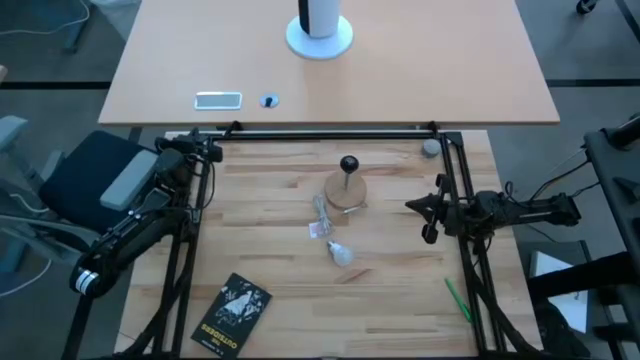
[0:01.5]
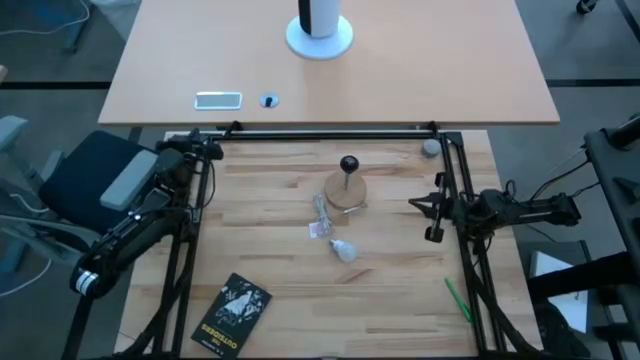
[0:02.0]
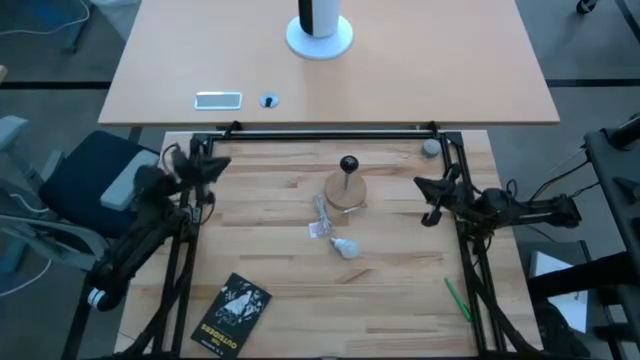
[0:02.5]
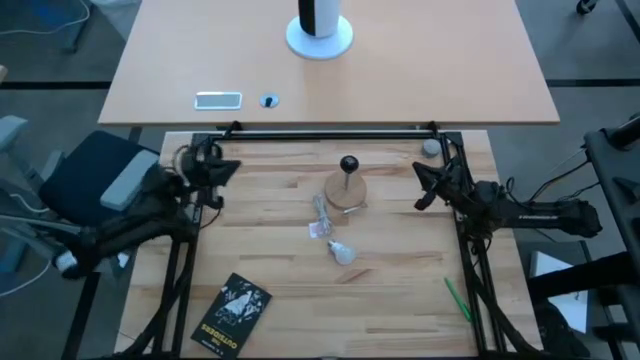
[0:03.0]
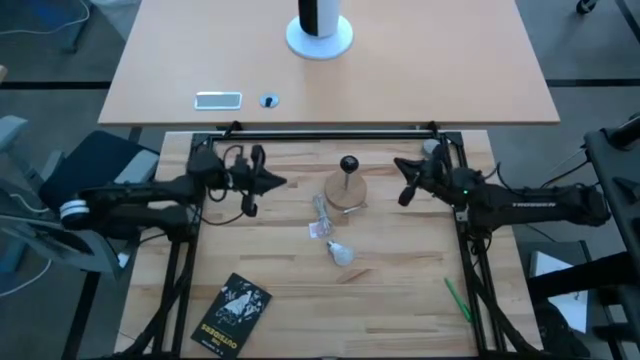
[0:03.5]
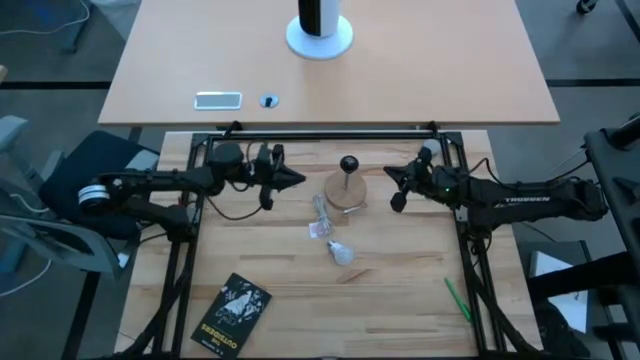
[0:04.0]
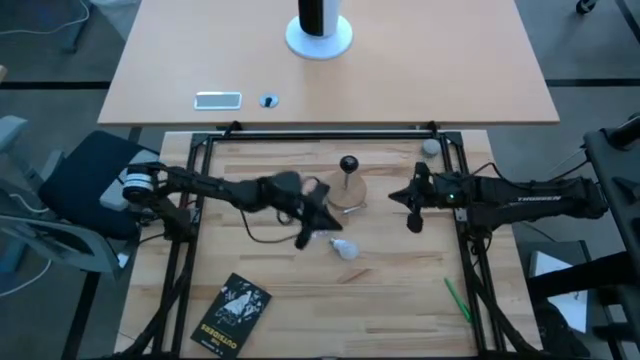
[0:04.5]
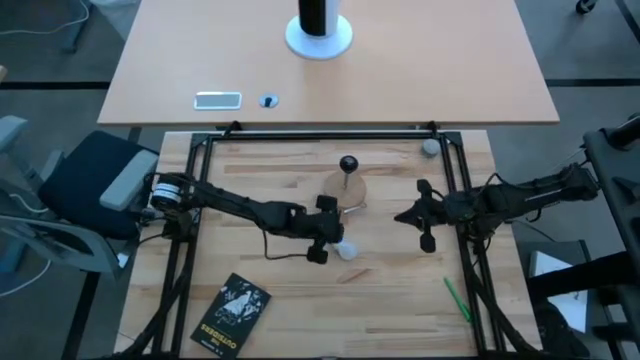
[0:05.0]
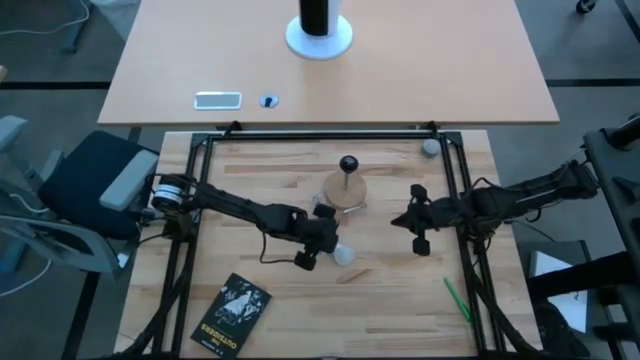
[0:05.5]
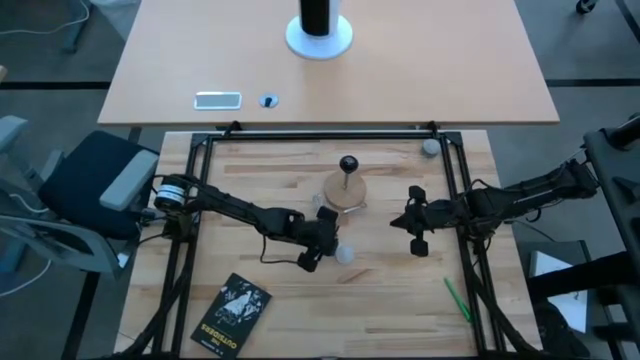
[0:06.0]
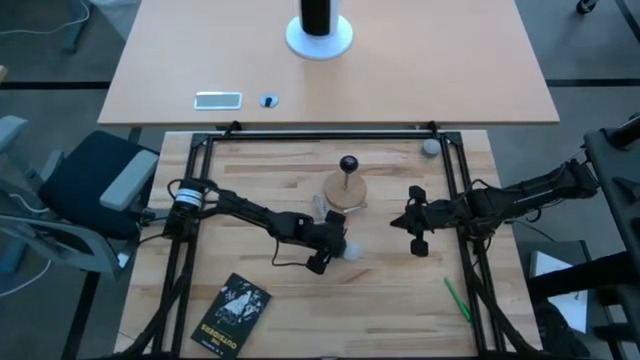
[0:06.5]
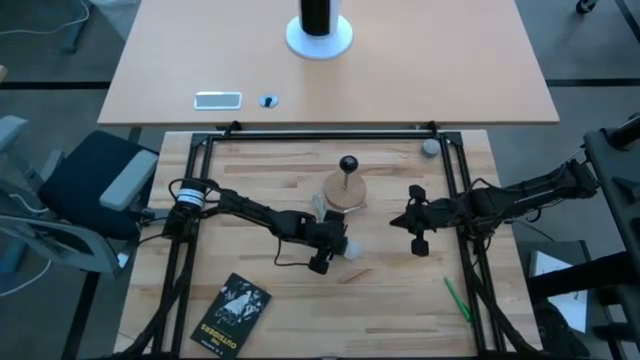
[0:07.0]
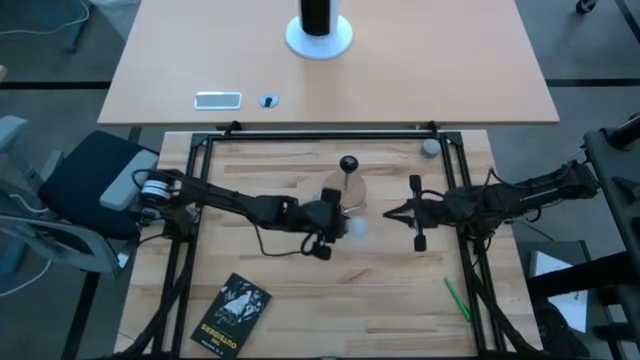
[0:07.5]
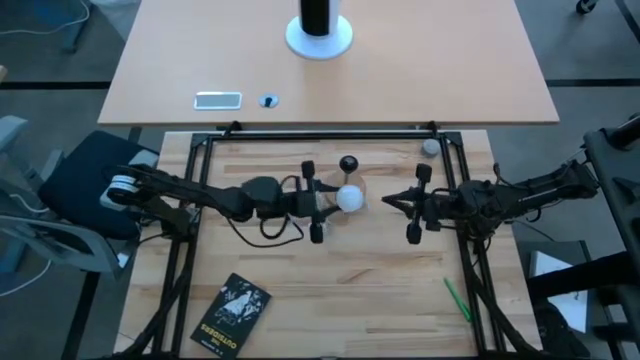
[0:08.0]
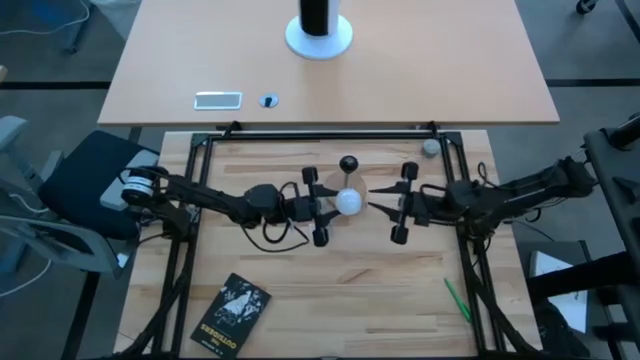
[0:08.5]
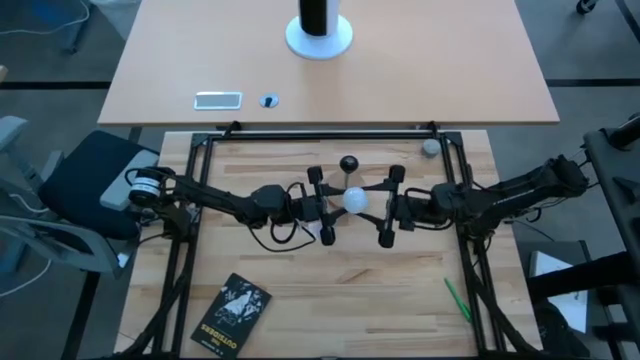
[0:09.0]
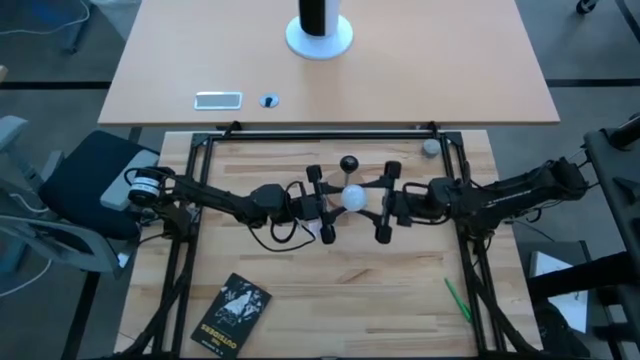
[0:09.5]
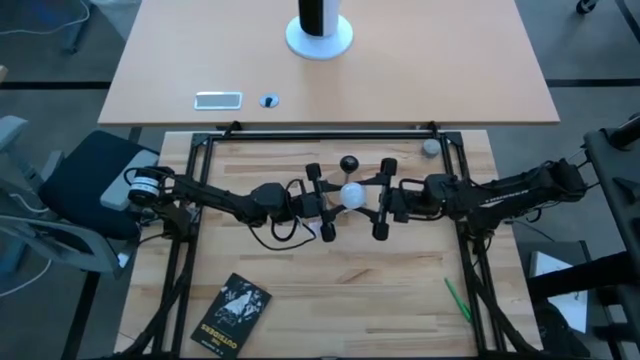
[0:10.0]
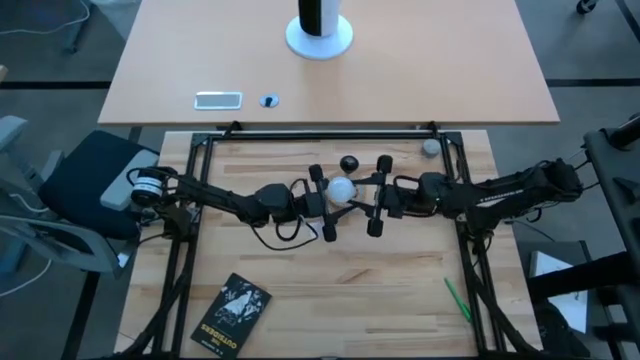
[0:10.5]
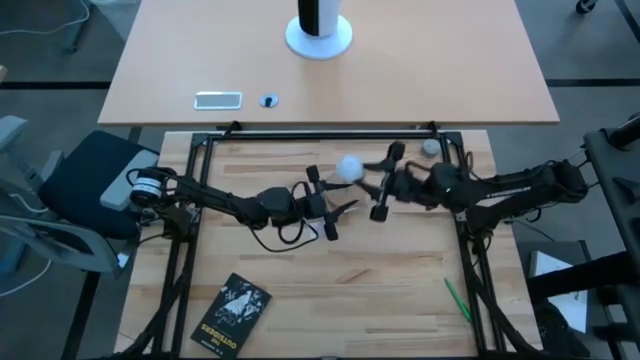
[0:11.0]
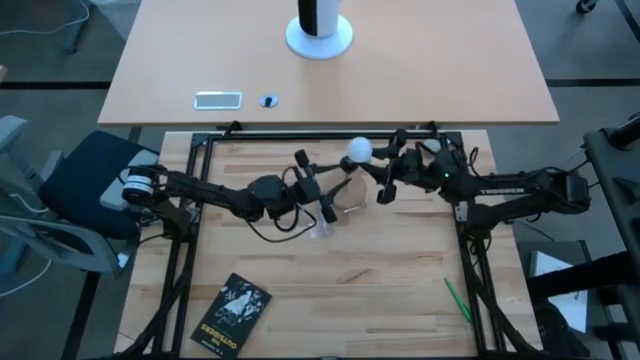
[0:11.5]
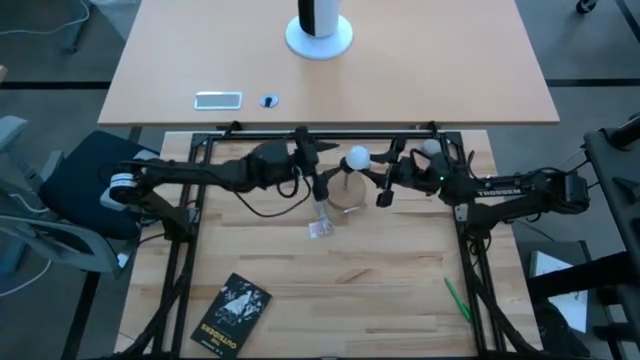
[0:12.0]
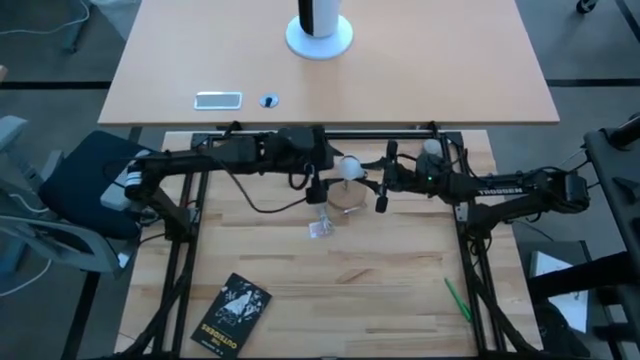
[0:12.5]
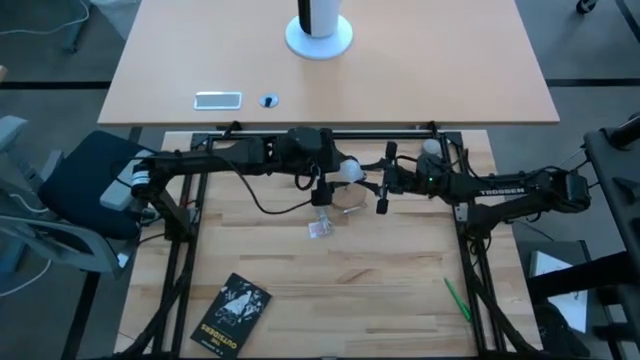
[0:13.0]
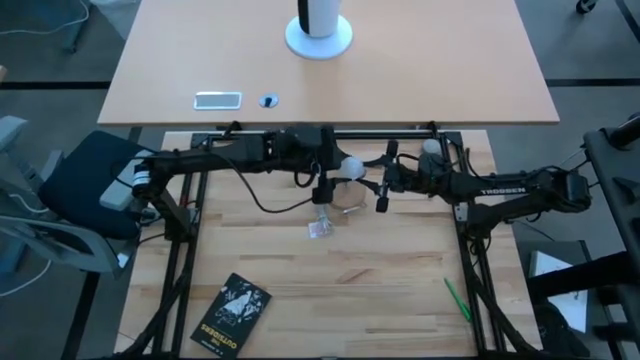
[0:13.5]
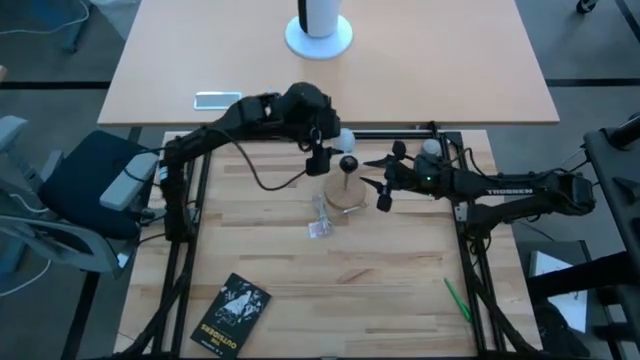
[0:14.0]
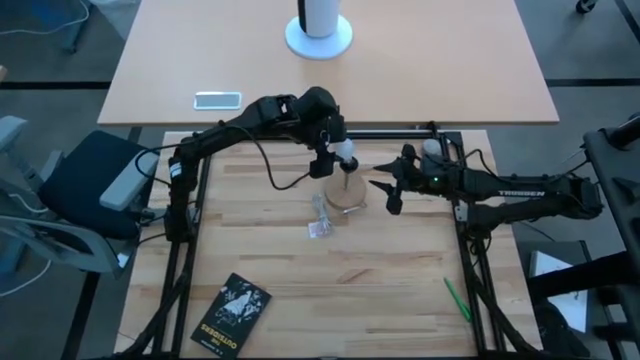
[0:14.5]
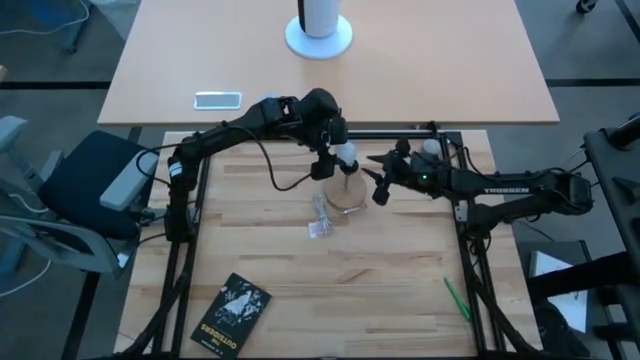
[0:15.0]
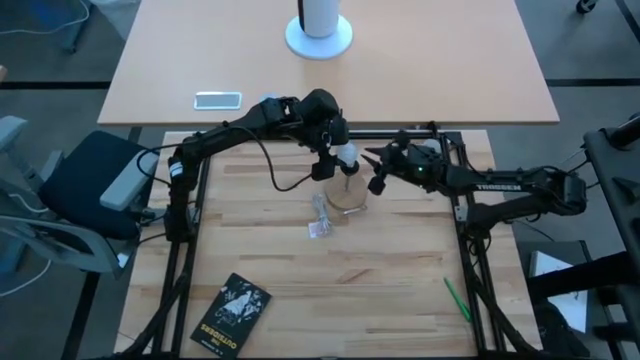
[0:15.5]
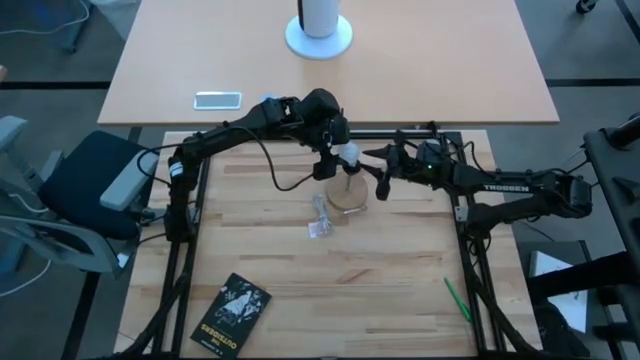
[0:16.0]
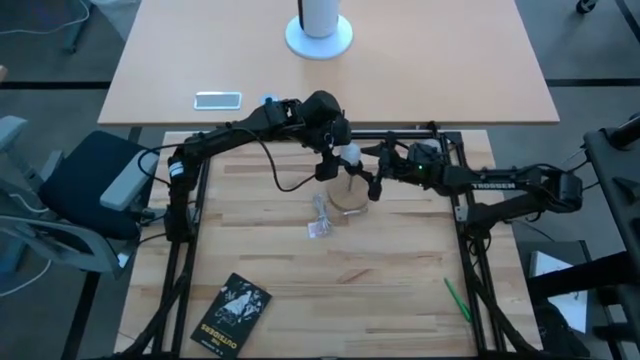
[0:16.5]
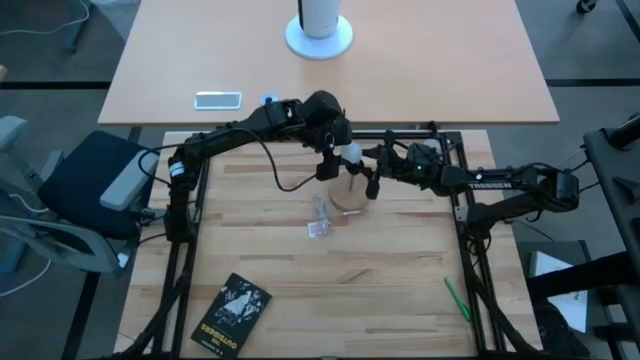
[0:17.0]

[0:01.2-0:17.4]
Task: Screw lightbulb
Insert the lightbulb into the lamp

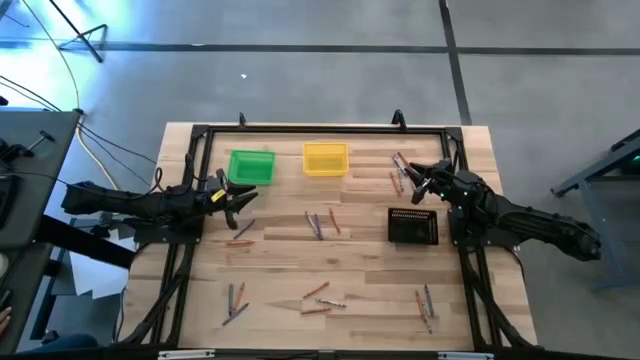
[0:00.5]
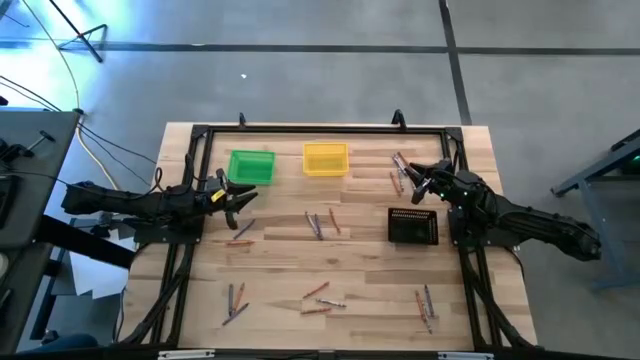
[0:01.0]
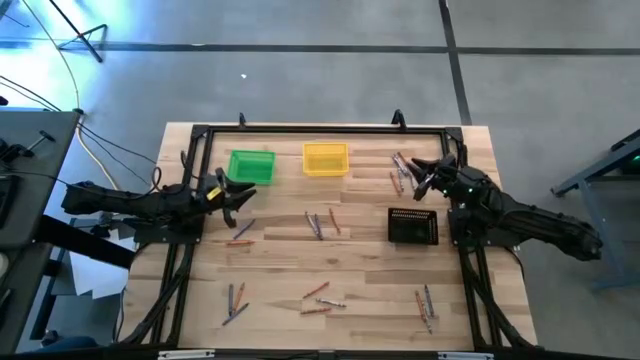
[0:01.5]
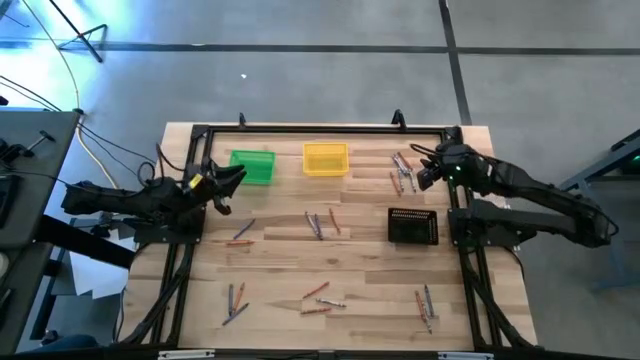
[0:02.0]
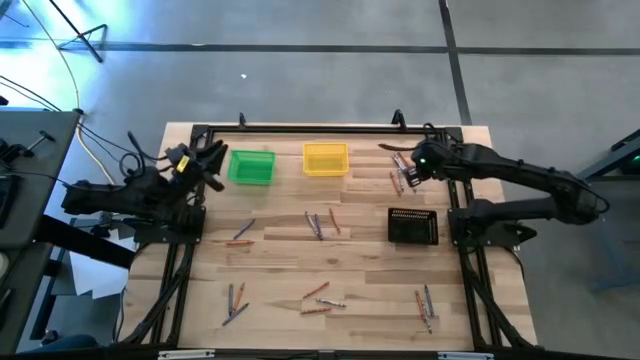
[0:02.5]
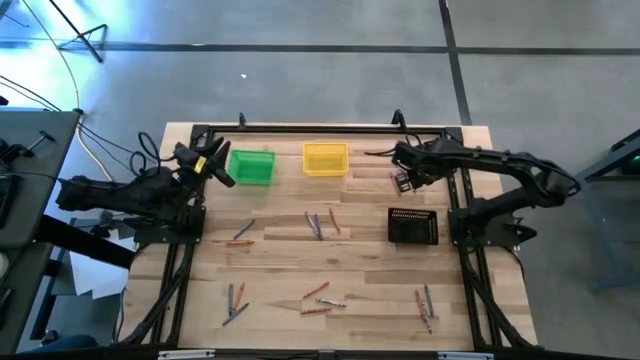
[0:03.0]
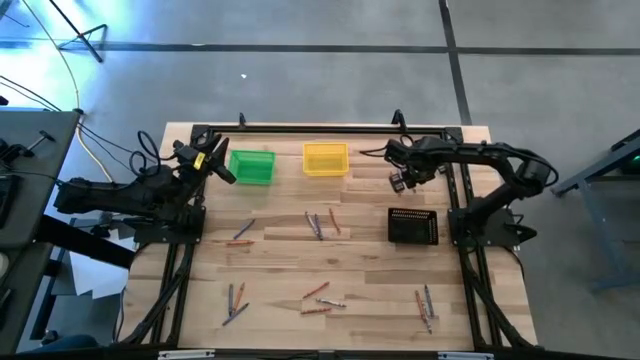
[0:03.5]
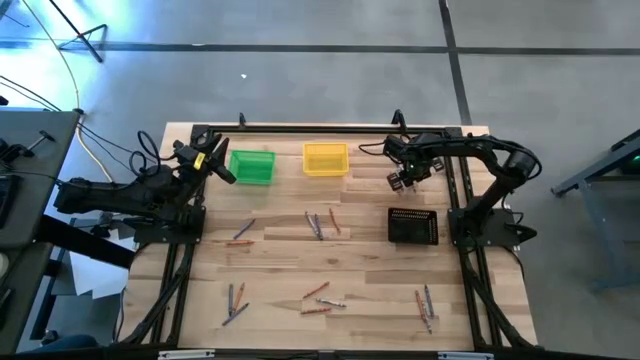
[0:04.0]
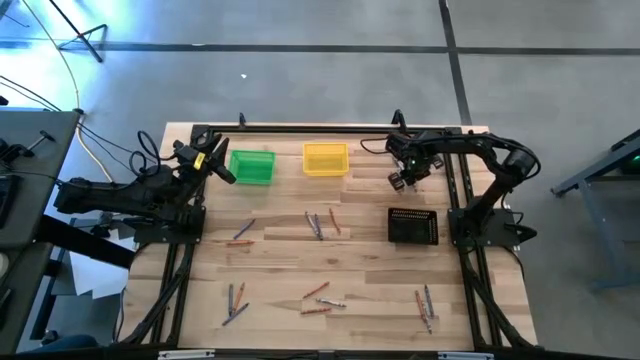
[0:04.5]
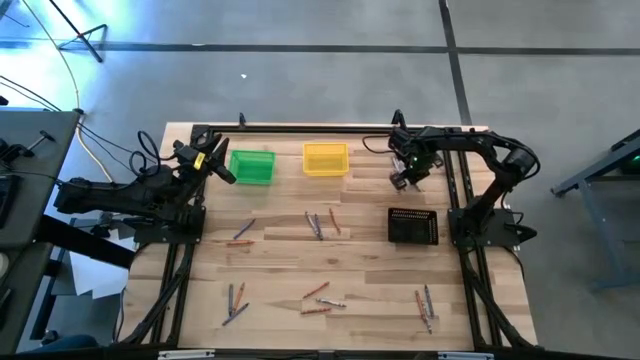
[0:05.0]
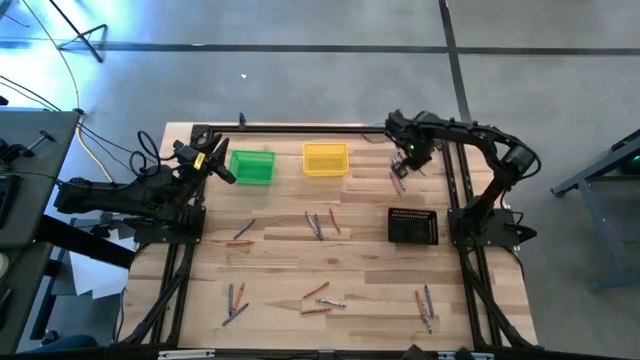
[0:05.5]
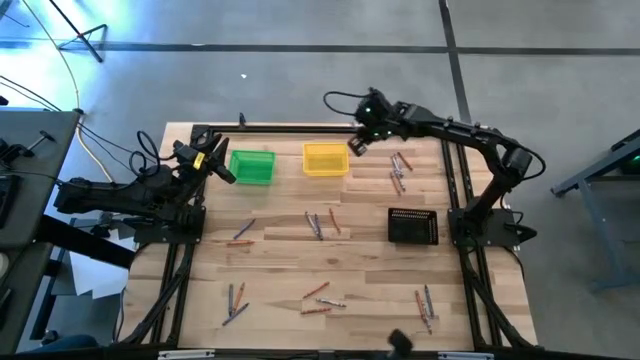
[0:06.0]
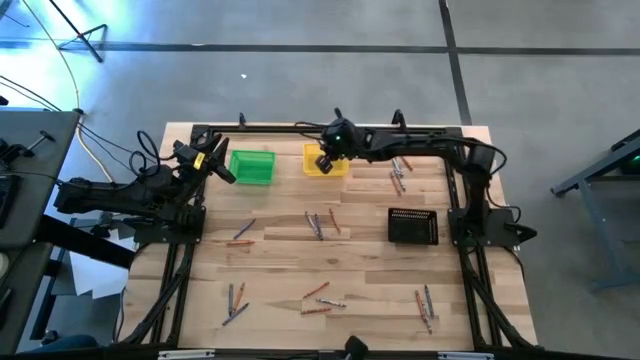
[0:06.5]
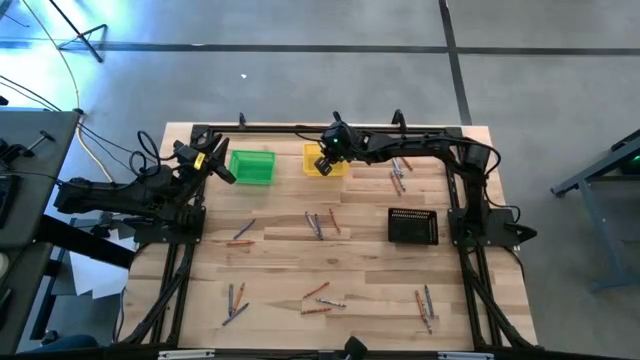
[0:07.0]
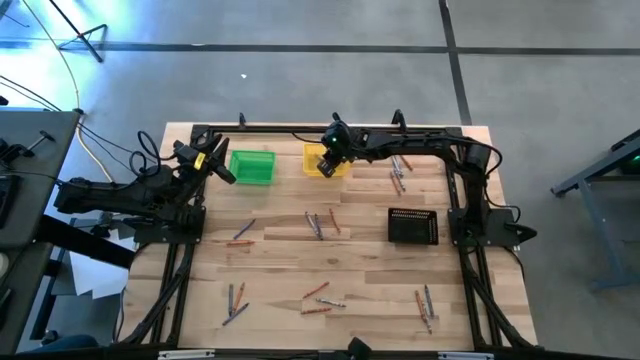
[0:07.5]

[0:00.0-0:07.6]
Task: Sort crayons
Put the gray crayon into the yellow bin
